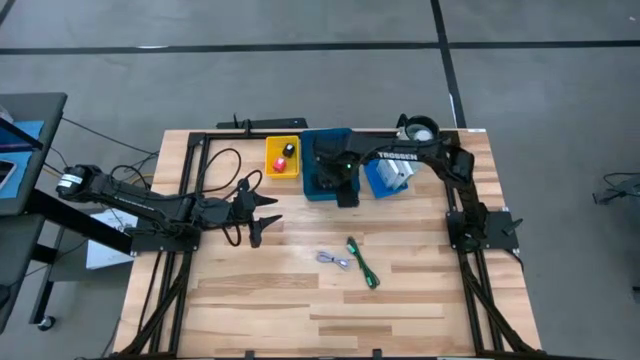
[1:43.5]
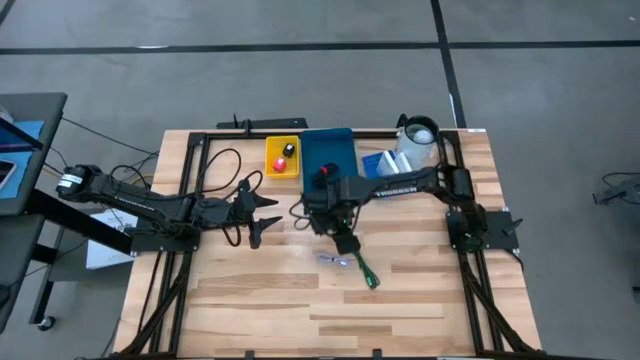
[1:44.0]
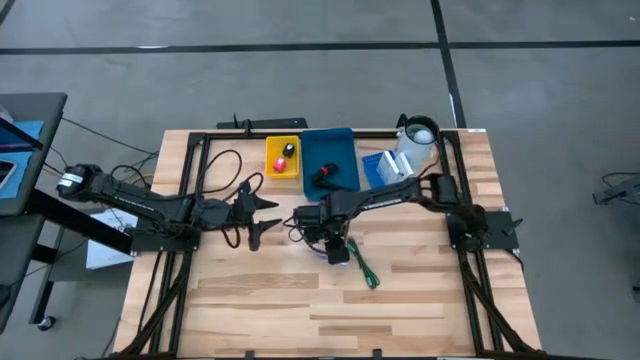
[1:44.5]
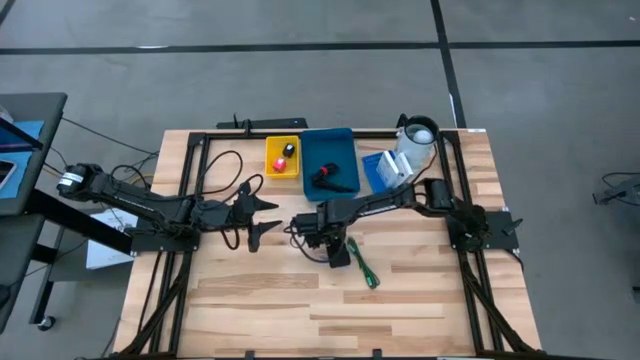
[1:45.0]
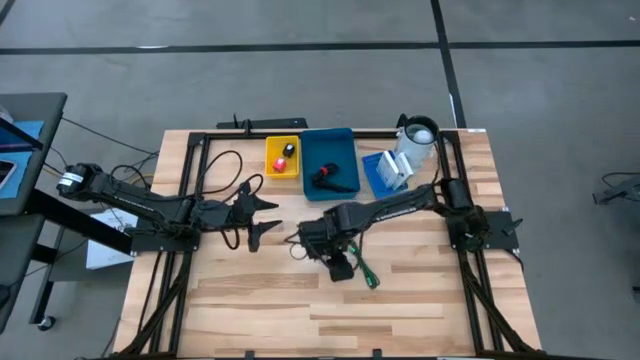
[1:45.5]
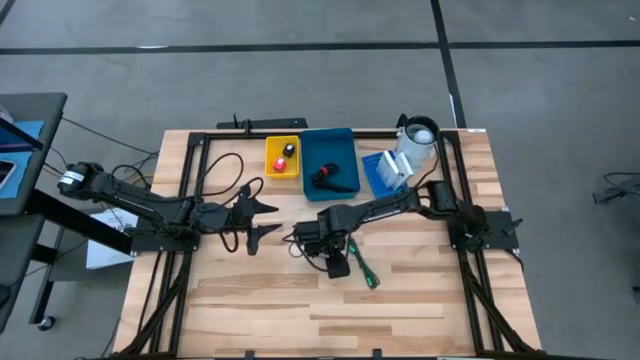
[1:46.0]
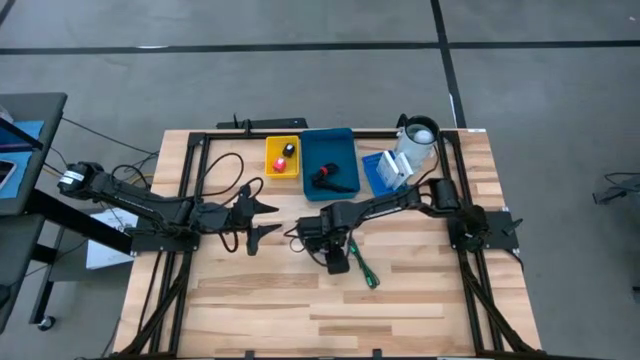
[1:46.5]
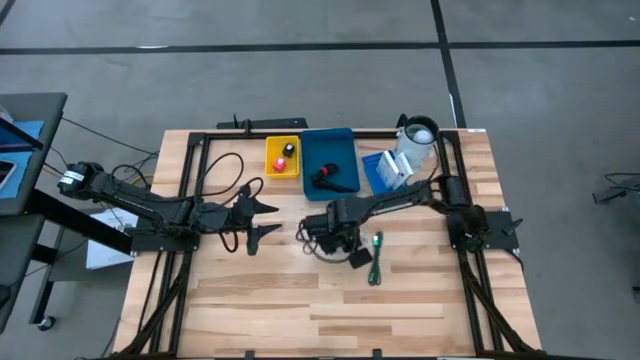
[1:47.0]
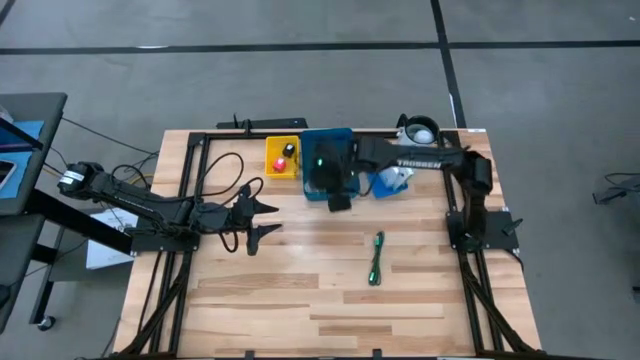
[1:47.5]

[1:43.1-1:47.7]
Task: Pick and place items into bin
Put the light blue charger cable into the blue bin

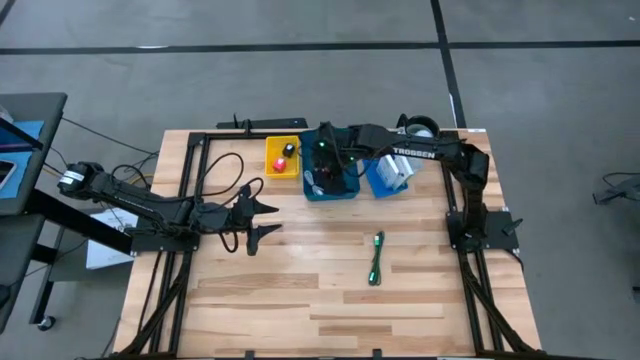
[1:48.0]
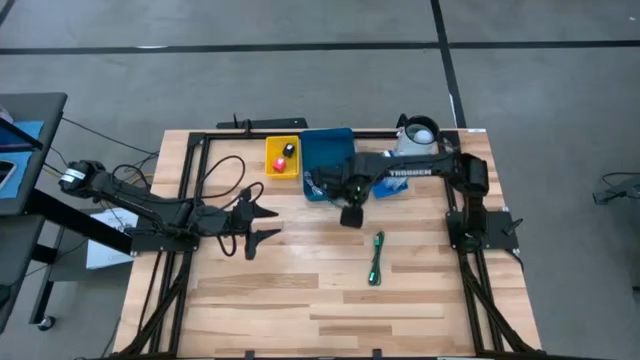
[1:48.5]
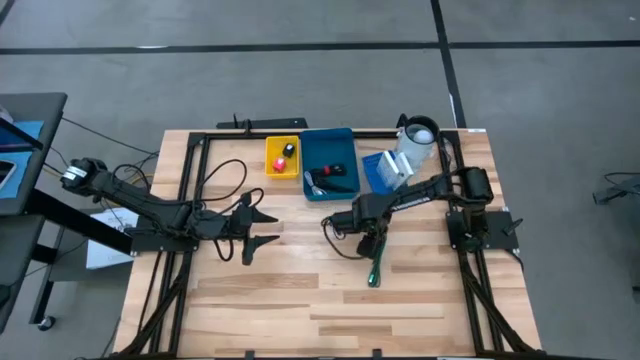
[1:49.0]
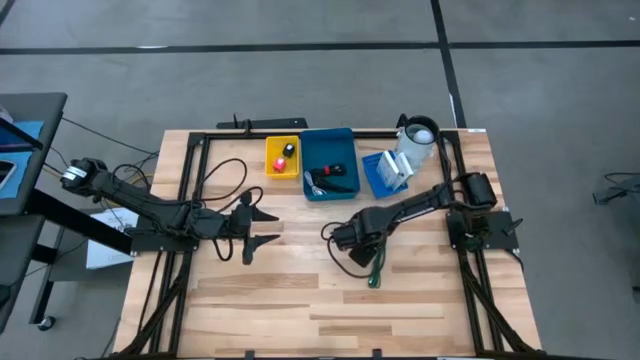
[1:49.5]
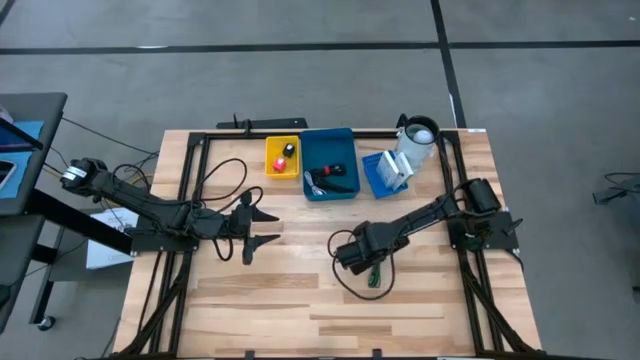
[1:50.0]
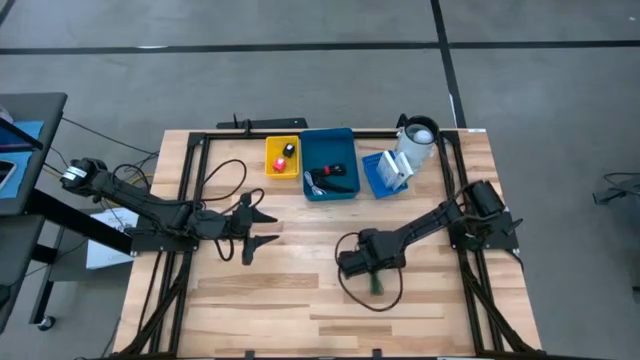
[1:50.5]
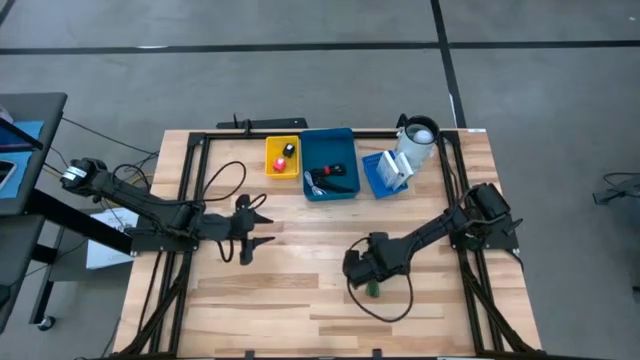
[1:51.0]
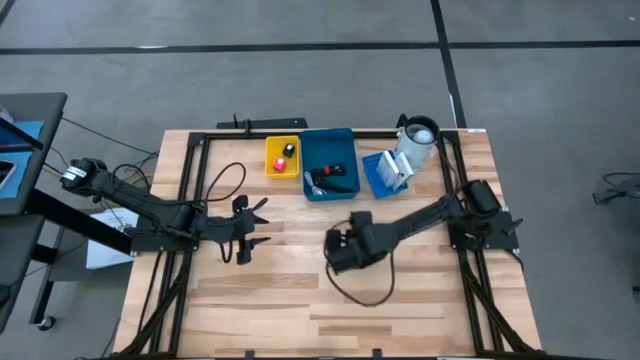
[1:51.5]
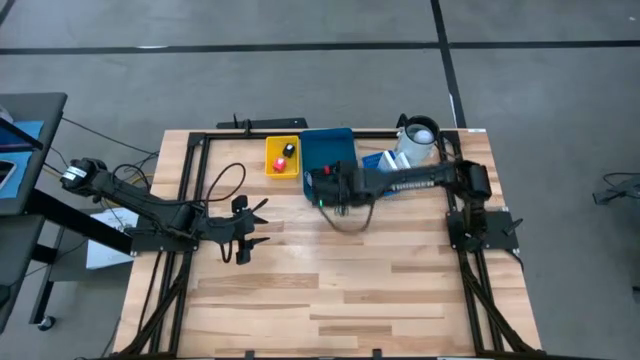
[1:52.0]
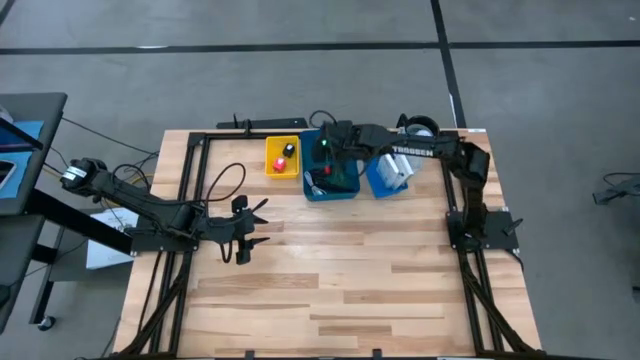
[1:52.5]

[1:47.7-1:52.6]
Put the green charger cable into the blue bin

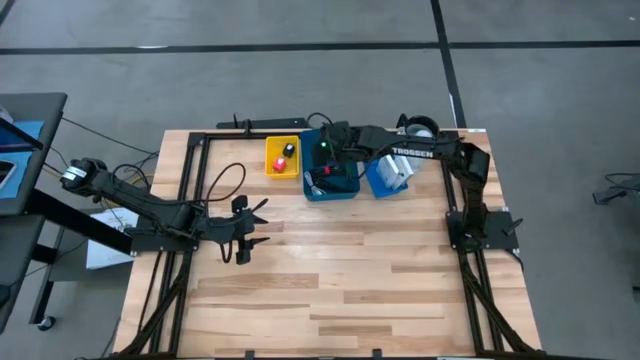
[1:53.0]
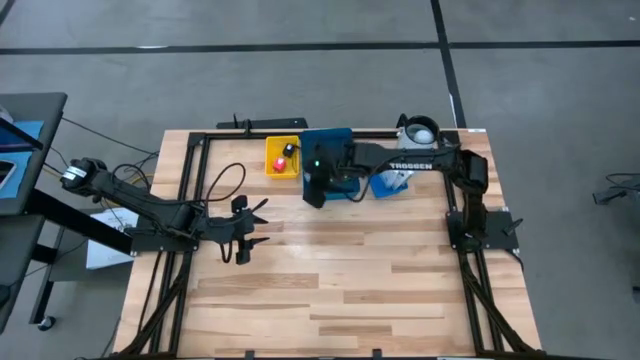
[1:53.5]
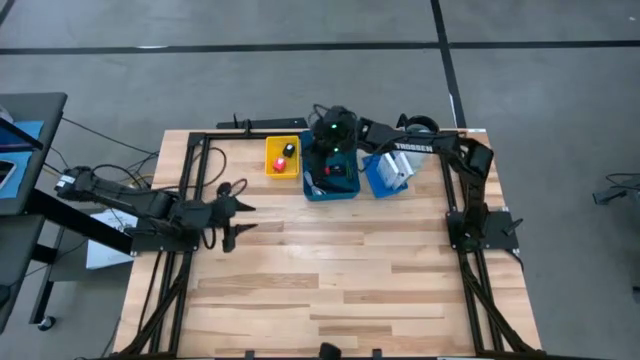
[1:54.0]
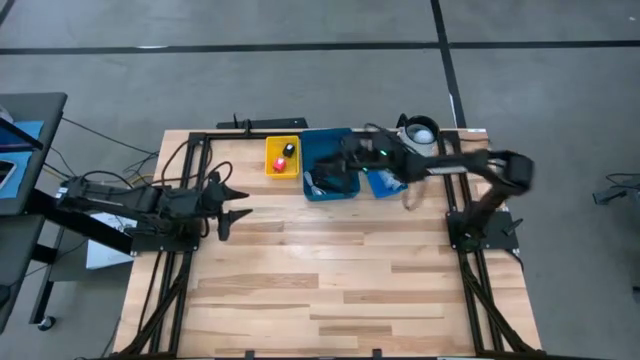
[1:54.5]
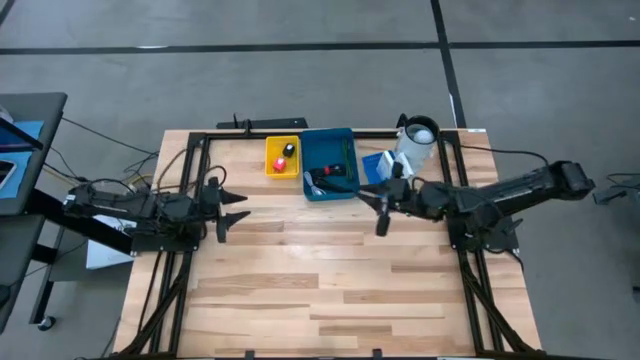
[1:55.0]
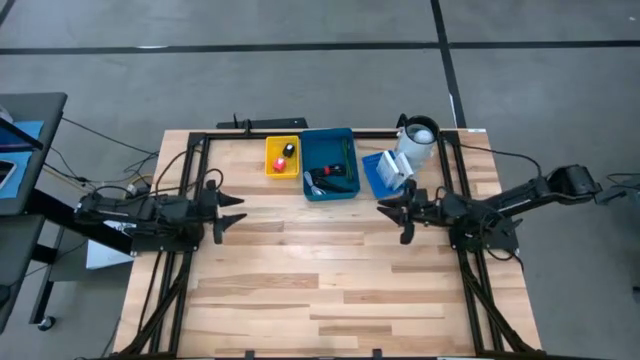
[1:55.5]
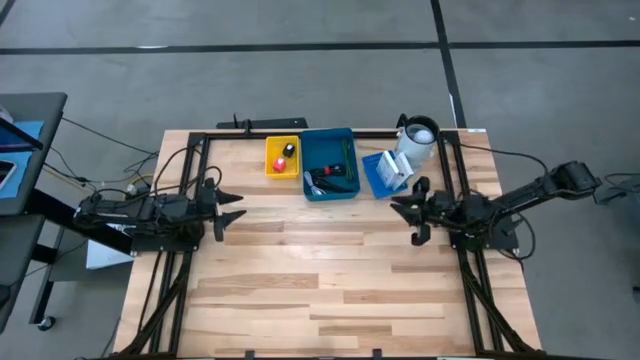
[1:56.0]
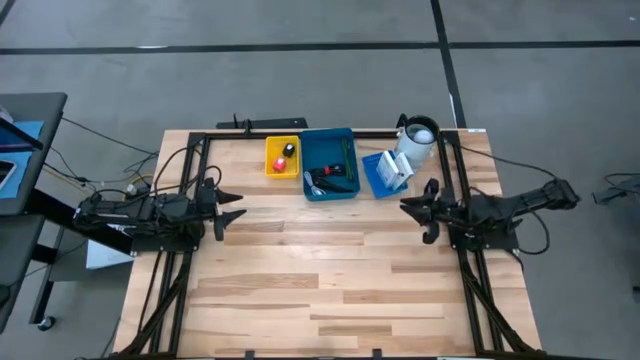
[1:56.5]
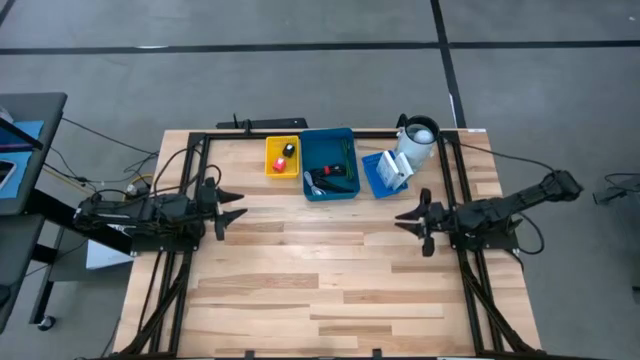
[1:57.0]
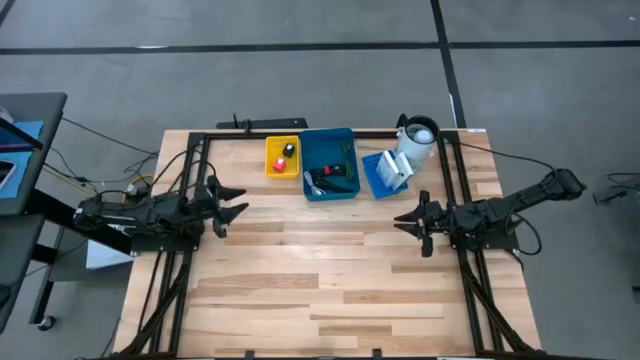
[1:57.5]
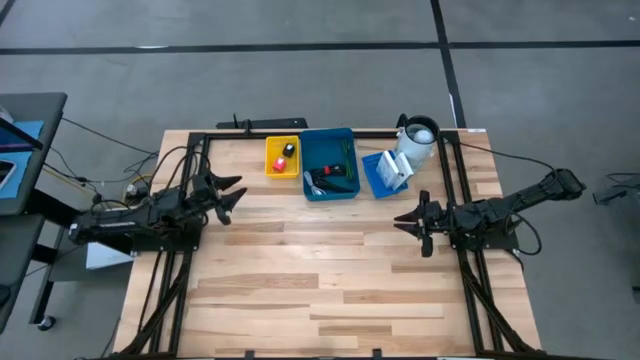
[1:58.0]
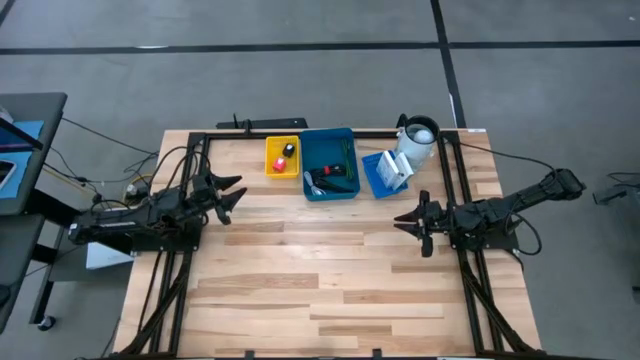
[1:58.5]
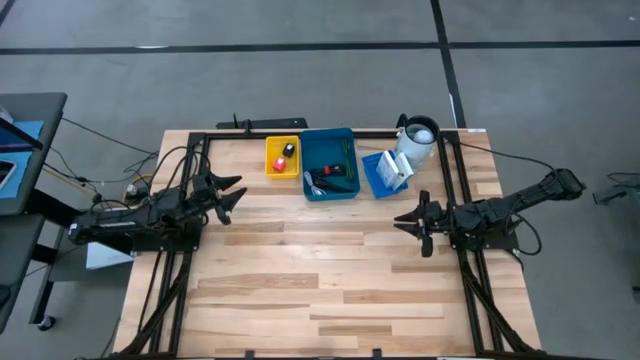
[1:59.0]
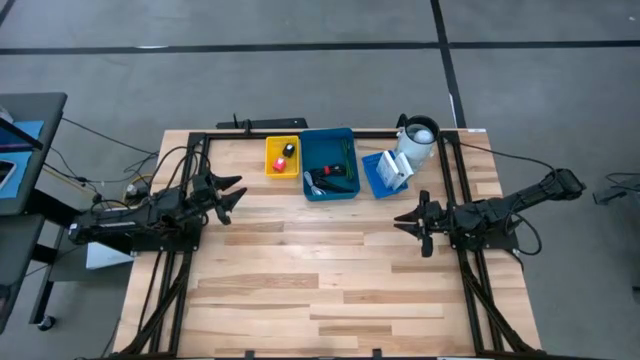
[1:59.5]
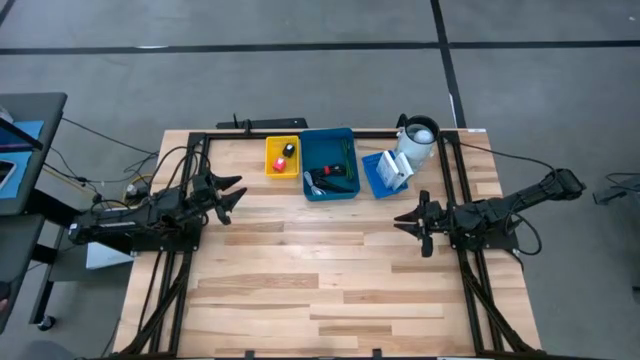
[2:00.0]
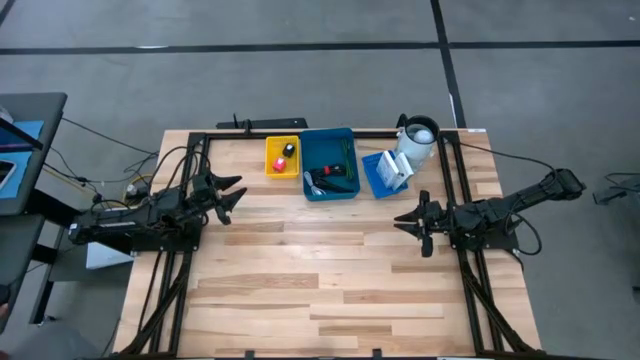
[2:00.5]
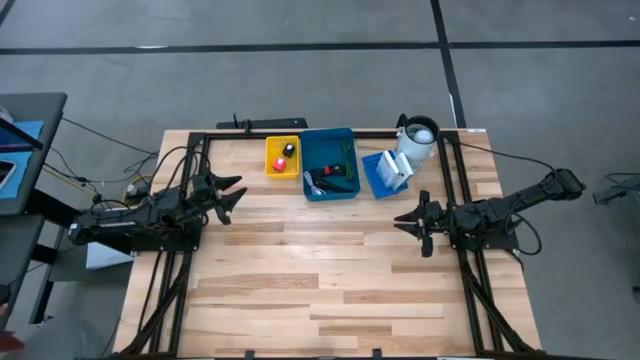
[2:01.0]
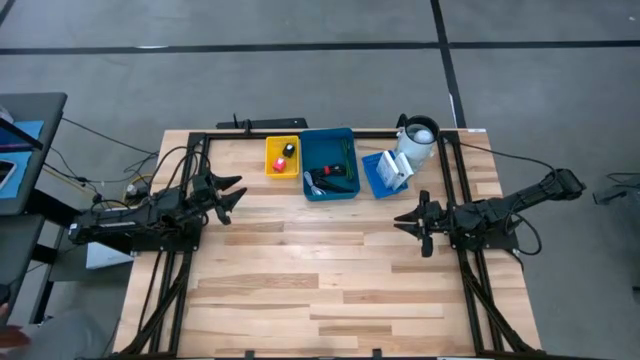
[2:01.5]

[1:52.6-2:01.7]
Return to Home Position

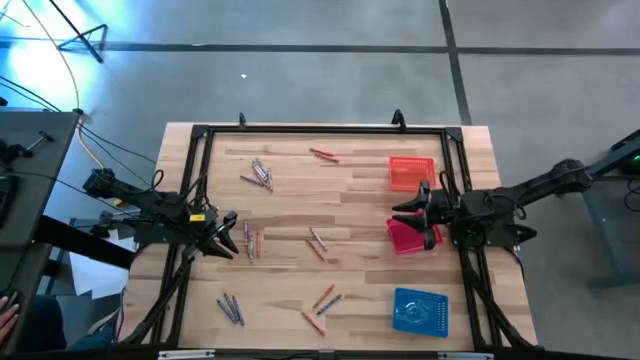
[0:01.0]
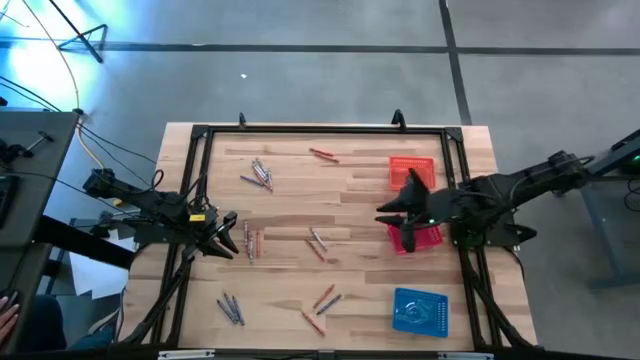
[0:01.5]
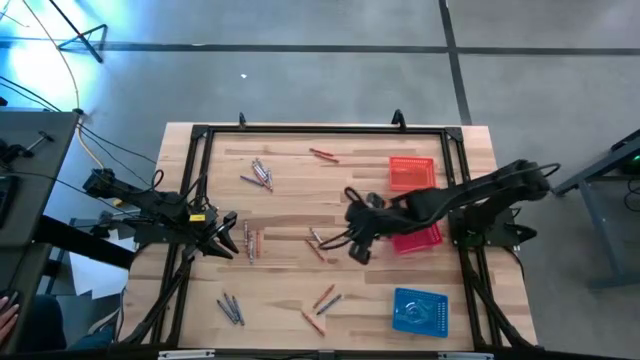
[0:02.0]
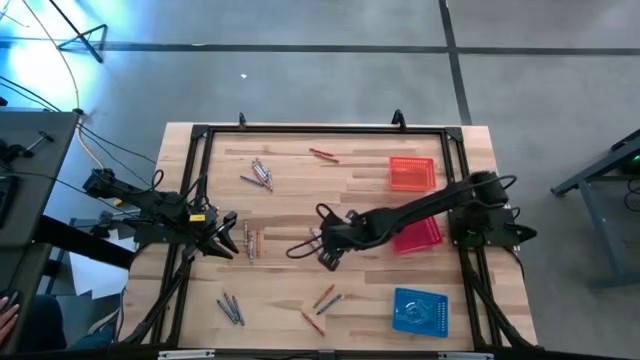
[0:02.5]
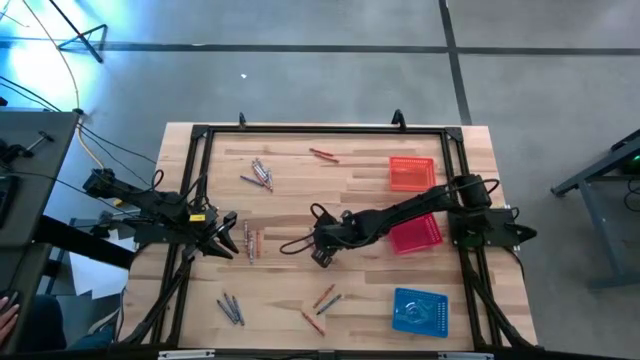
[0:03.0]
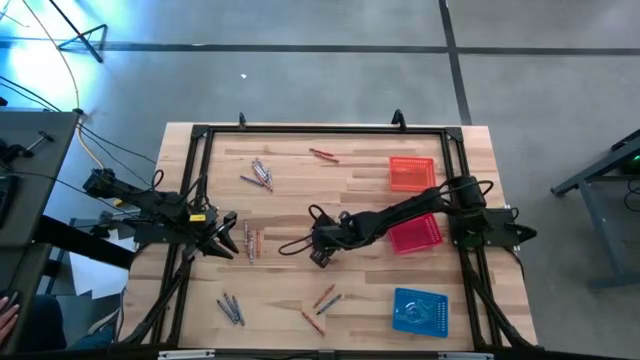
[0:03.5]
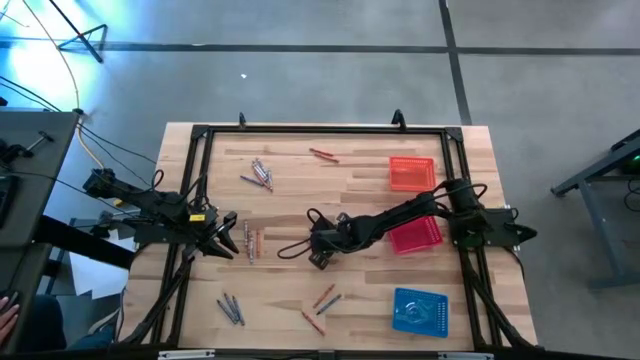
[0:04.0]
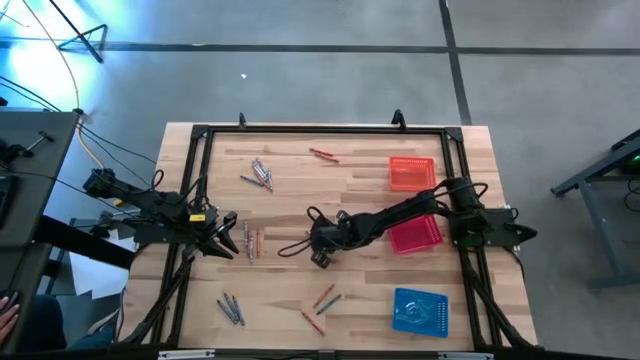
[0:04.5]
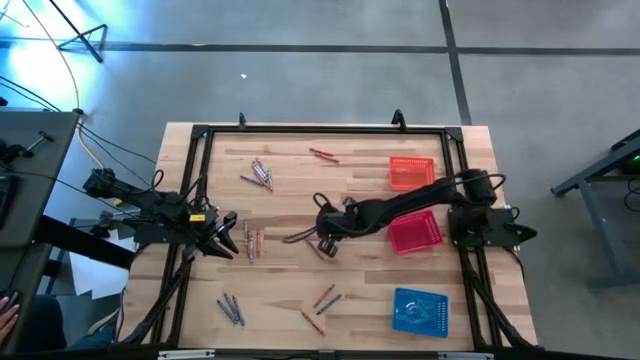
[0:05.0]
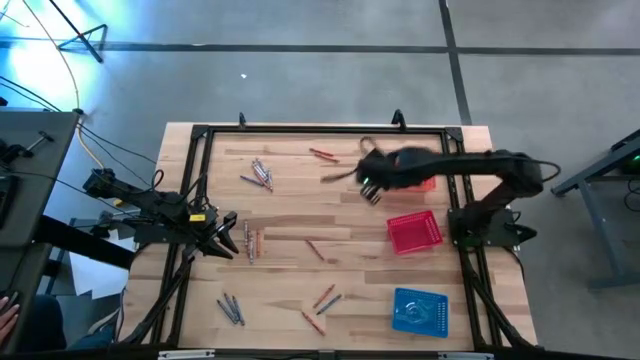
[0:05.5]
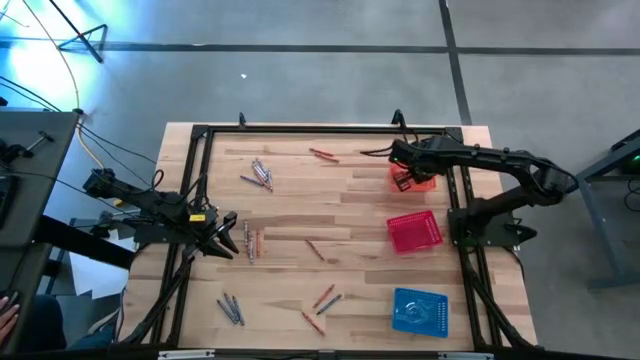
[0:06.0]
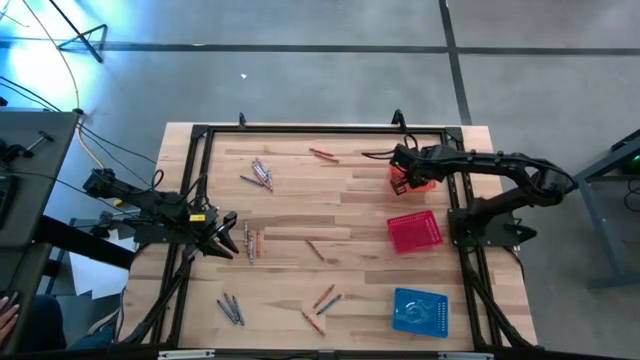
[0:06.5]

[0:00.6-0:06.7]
Task: Sort crayons
Put the gray crayon into the orange bin
